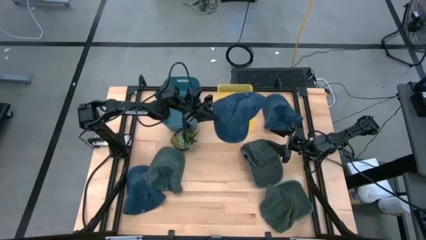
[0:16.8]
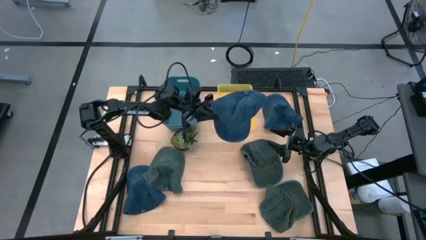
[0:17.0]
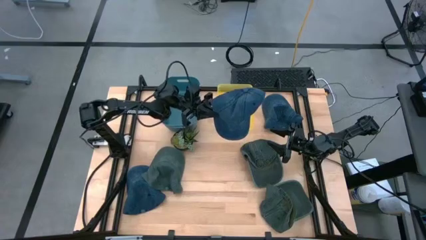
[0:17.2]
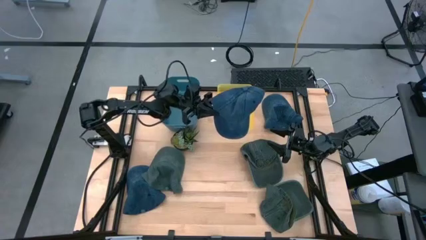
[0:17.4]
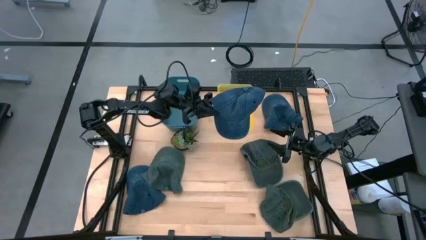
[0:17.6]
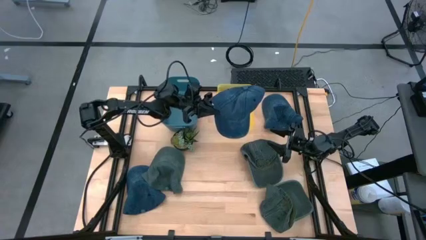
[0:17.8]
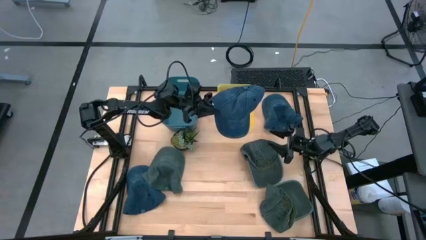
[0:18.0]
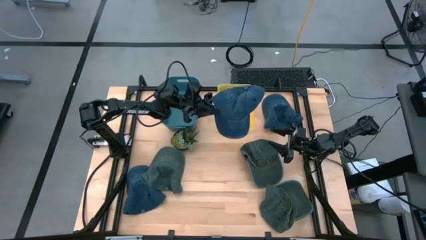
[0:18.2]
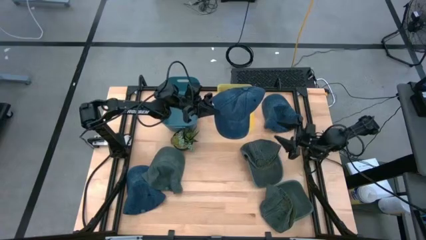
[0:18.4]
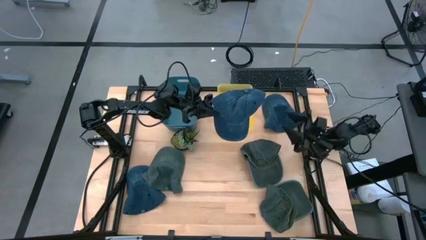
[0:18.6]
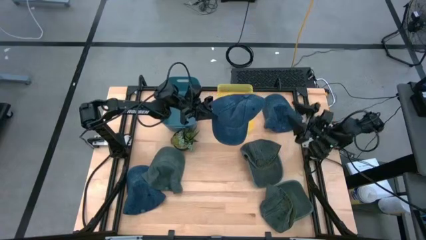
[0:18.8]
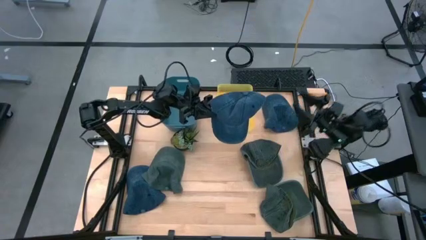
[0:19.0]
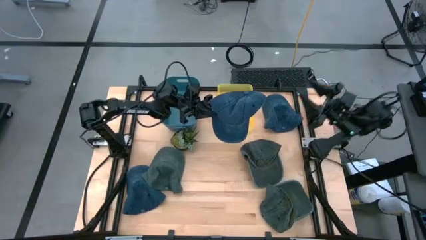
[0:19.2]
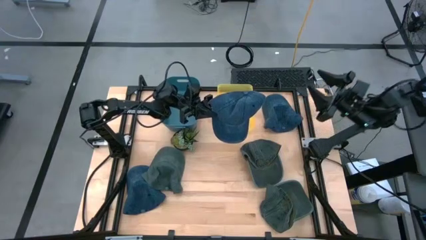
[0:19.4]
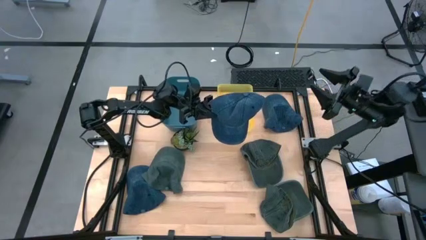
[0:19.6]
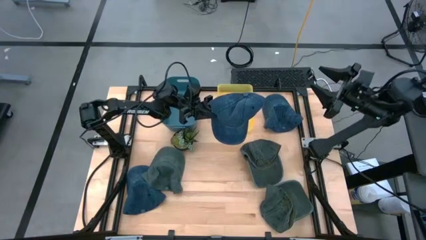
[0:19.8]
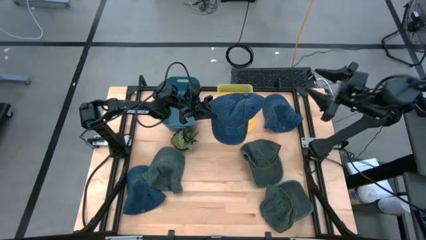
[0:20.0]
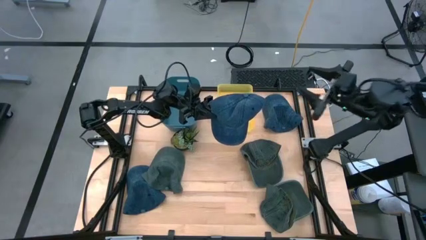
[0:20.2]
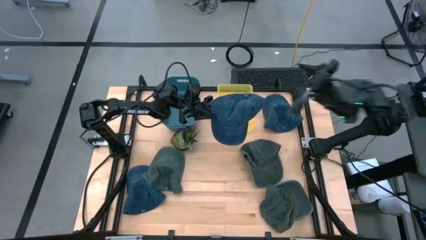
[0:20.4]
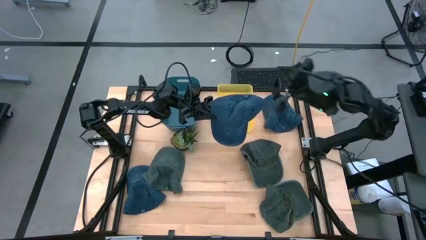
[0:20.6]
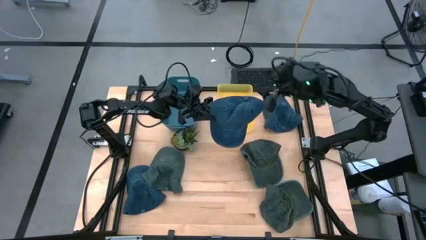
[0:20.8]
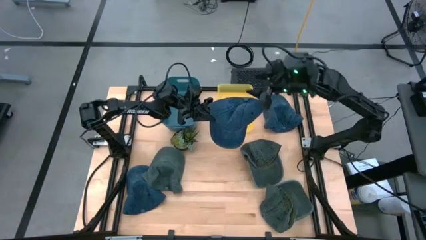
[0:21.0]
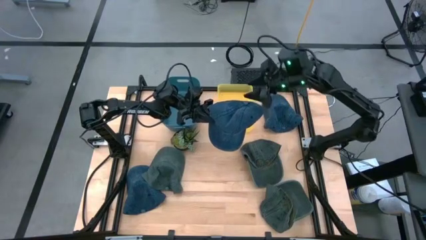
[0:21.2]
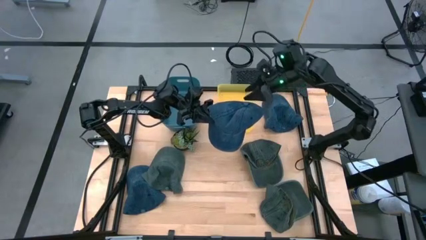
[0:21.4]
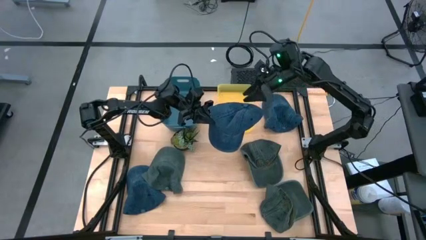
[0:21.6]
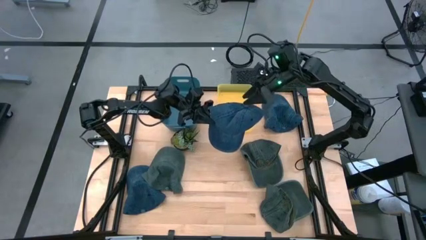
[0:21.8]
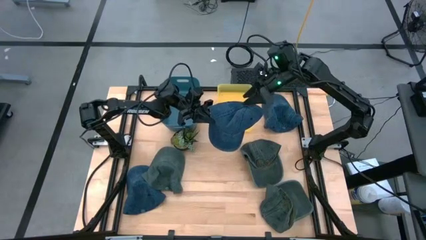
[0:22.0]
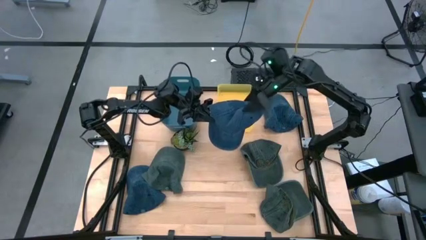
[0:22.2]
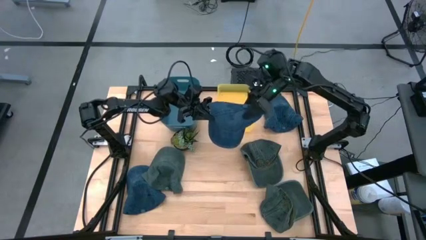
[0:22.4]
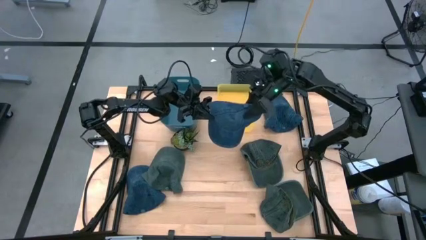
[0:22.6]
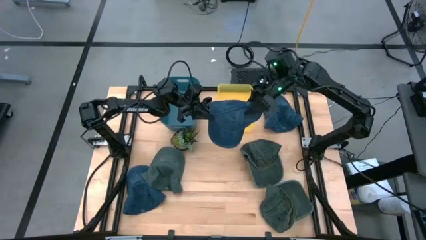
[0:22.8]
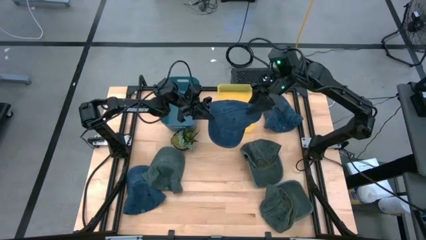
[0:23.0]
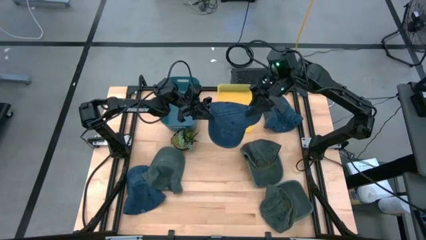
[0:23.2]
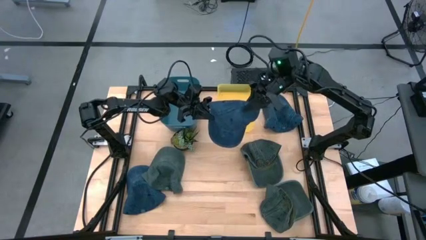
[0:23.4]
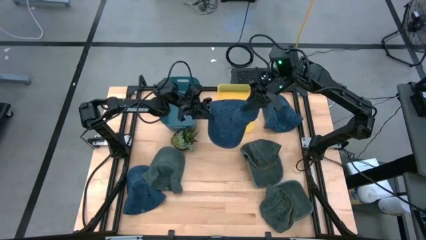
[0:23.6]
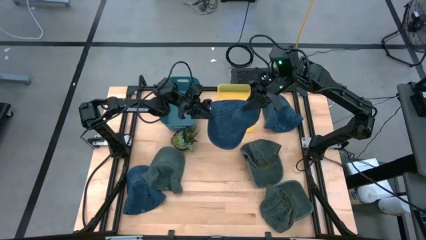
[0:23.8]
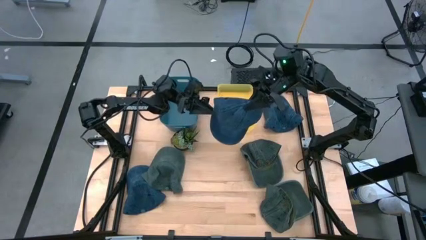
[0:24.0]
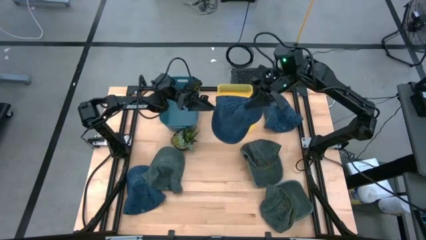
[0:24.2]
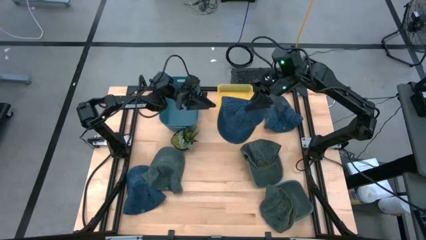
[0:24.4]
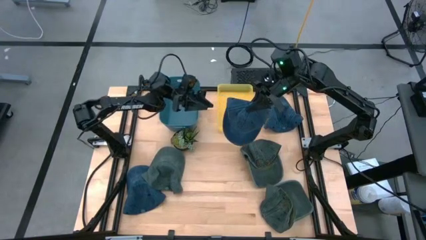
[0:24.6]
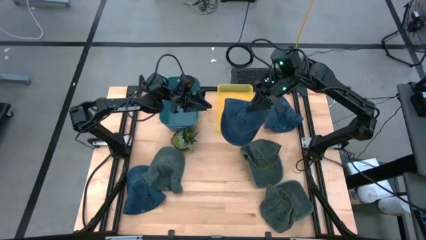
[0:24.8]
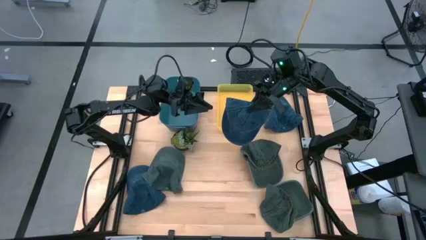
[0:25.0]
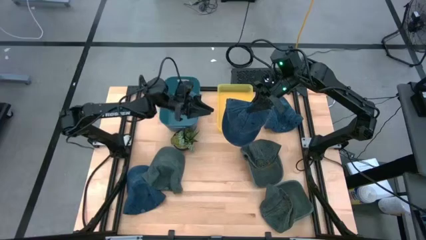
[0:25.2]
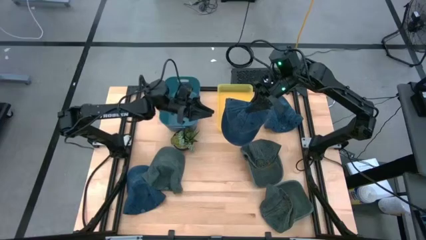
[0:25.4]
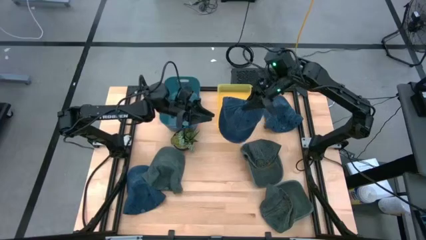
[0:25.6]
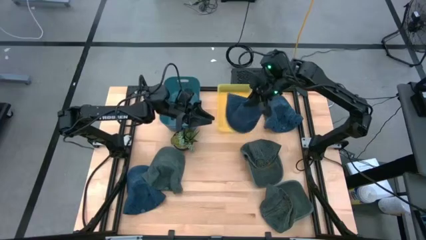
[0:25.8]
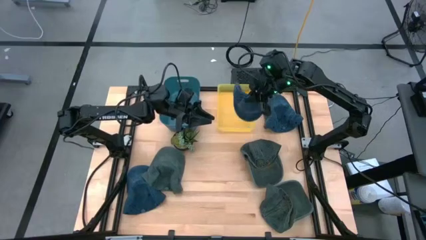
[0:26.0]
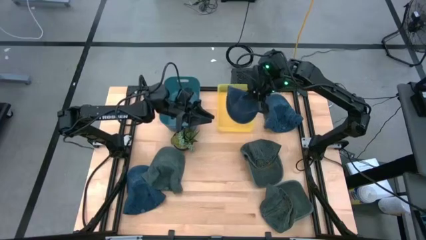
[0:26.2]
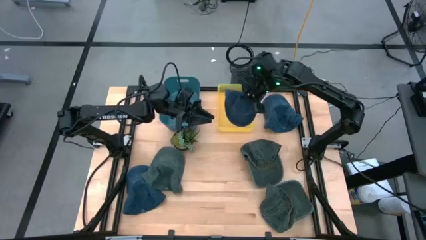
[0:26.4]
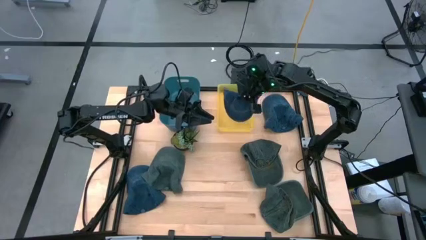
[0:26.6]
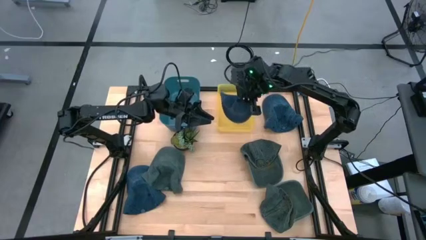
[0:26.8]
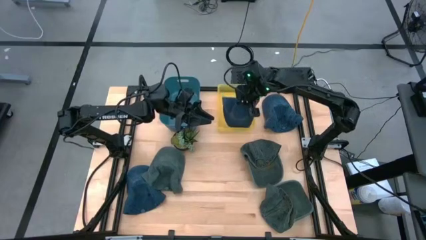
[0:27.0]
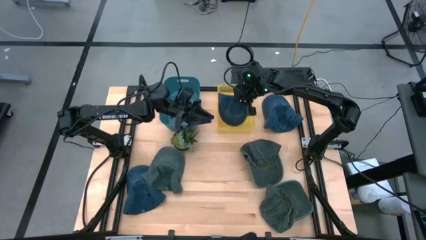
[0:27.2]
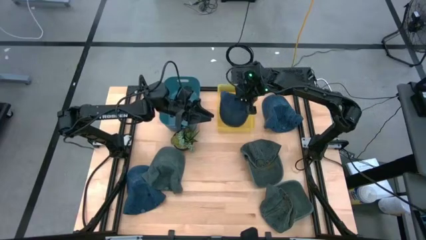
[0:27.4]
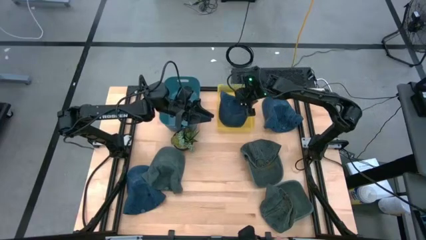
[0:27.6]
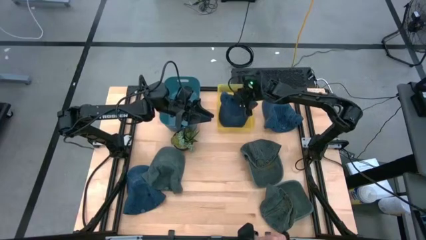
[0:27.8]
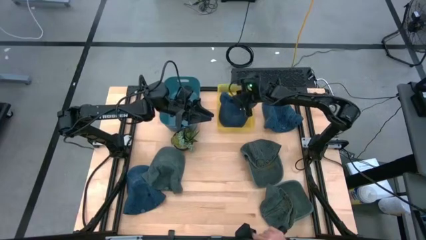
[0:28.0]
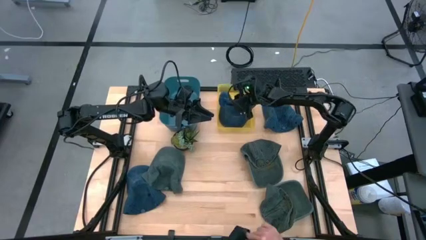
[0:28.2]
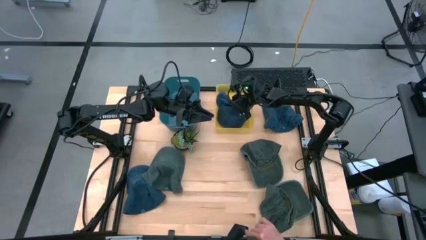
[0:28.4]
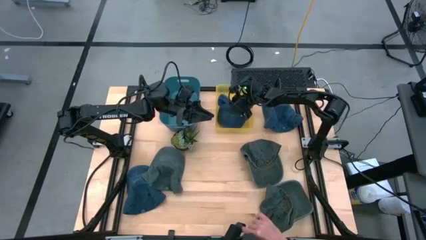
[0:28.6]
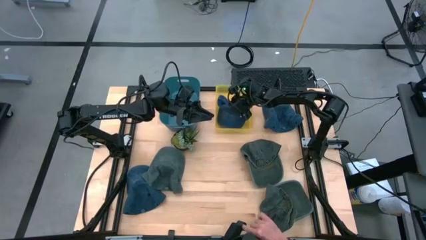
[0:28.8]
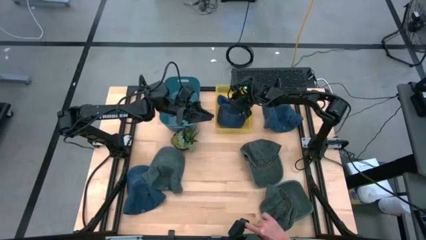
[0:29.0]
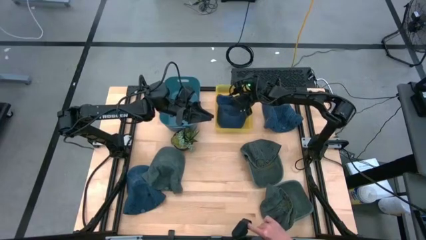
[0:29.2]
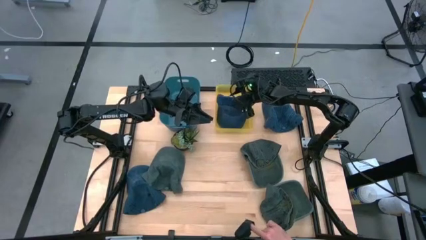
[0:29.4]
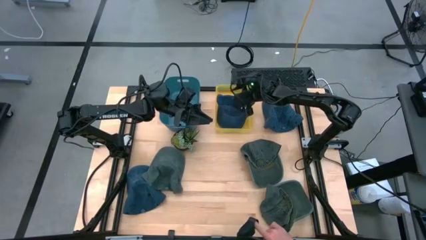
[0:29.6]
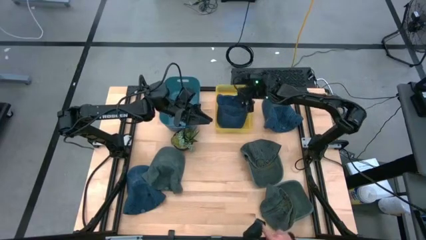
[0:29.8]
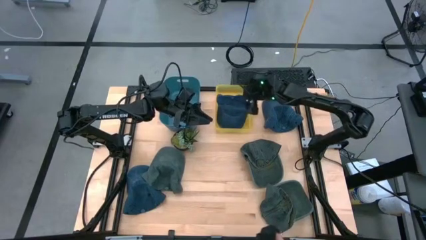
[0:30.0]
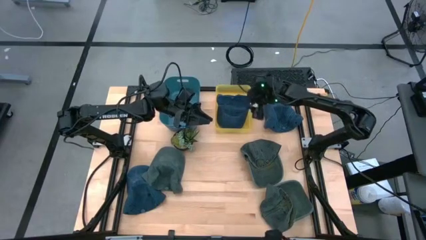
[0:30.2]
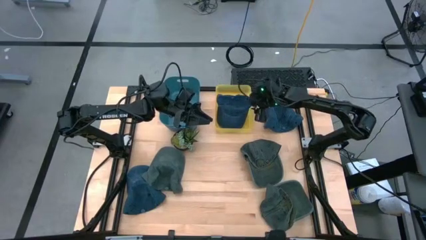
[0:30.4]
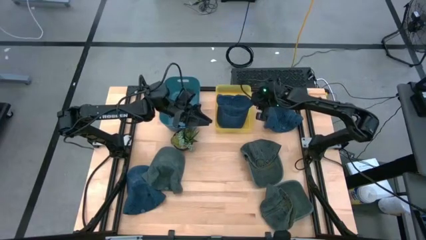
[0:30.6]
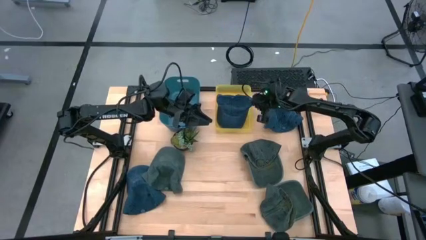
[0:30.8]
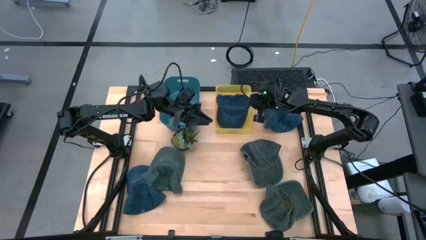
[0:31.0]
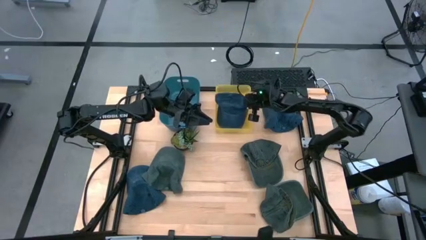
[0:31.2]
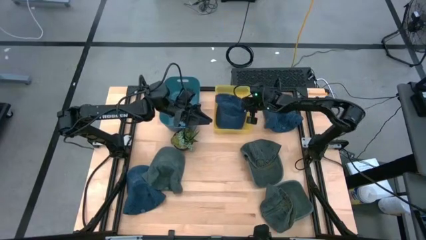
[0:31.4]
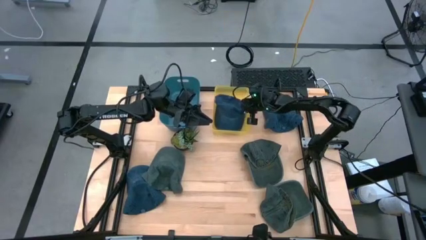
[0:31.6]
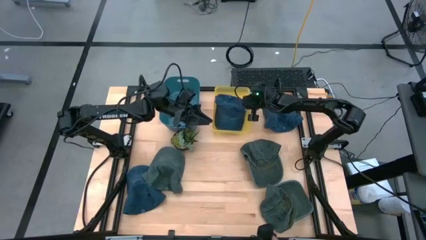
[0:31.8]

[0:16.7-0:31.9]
Task: Pick & Place hat
Put the middle blue cap into the yellow bin
